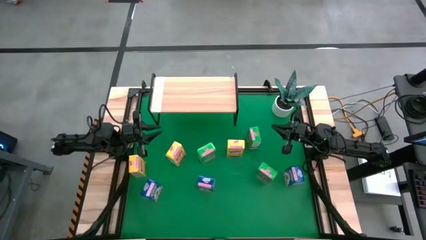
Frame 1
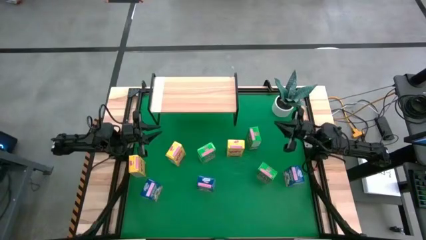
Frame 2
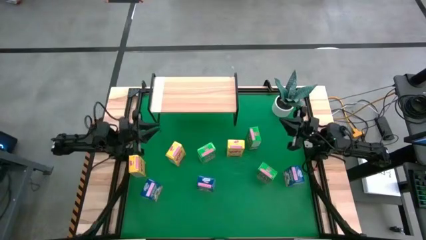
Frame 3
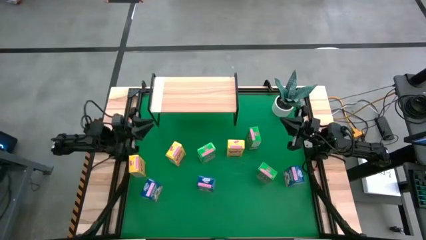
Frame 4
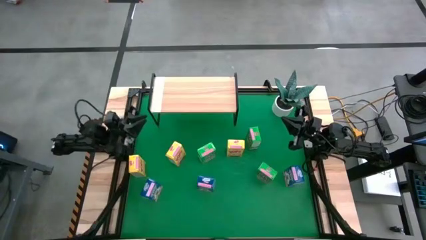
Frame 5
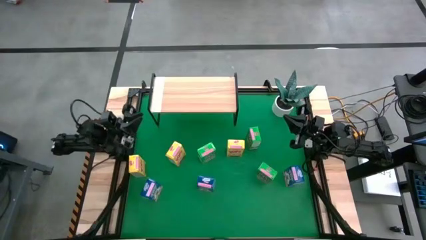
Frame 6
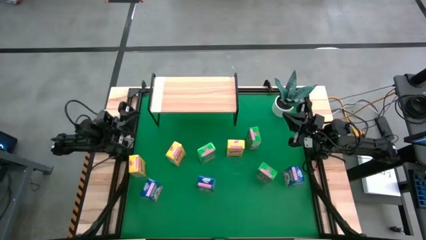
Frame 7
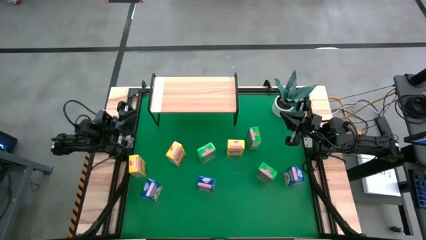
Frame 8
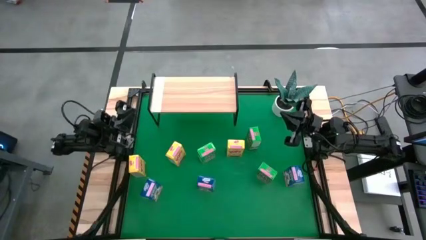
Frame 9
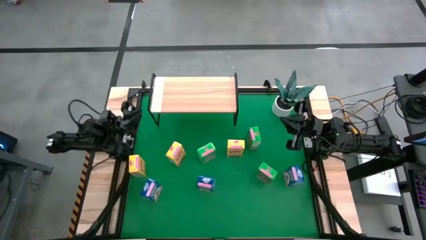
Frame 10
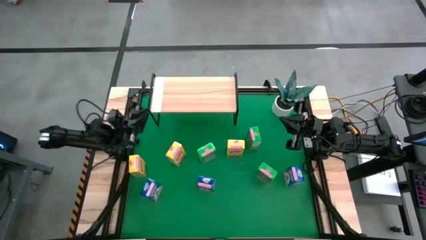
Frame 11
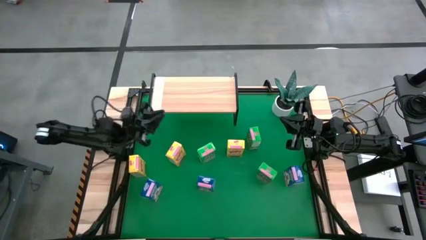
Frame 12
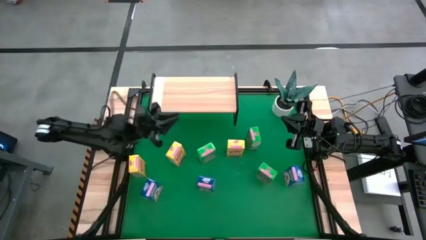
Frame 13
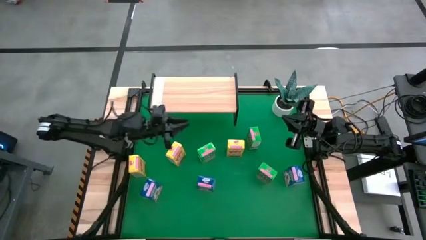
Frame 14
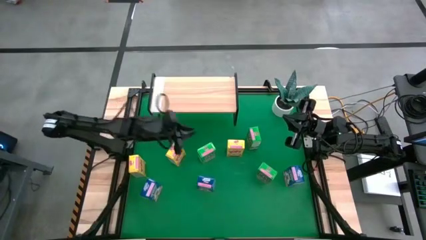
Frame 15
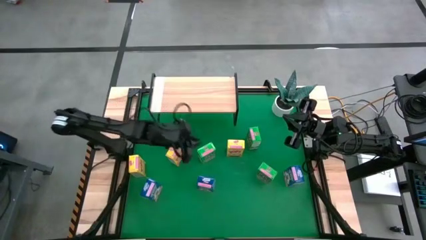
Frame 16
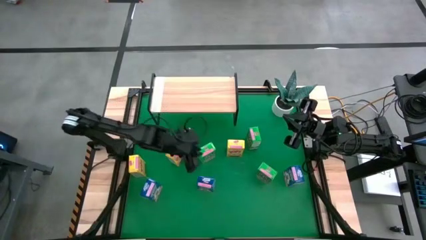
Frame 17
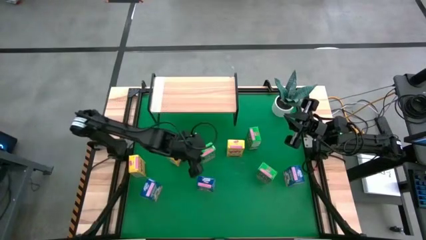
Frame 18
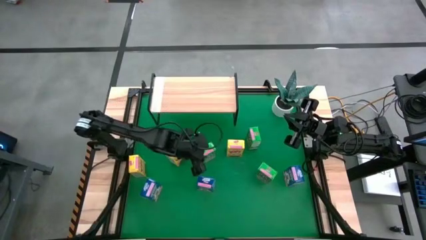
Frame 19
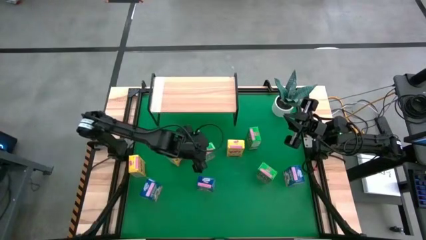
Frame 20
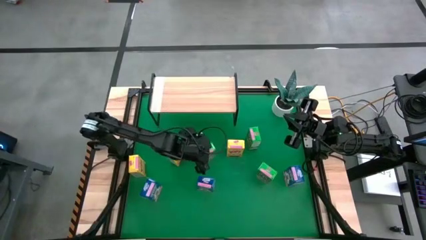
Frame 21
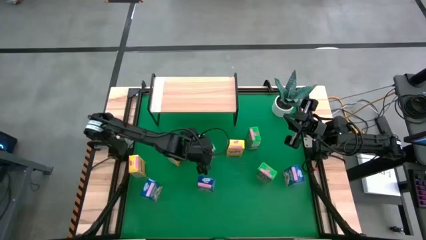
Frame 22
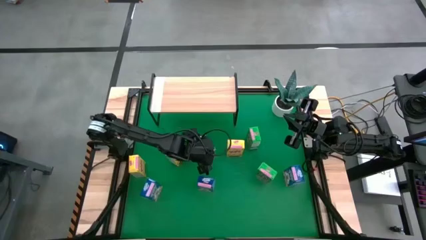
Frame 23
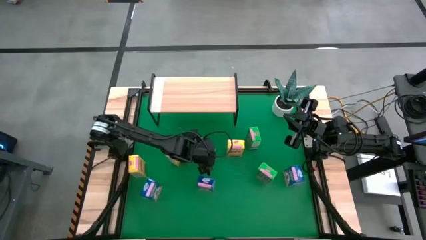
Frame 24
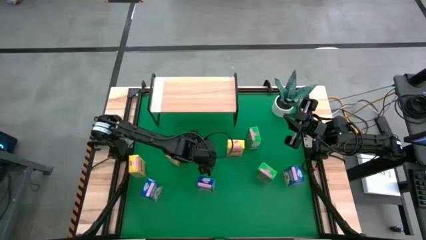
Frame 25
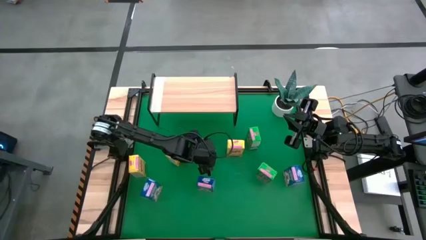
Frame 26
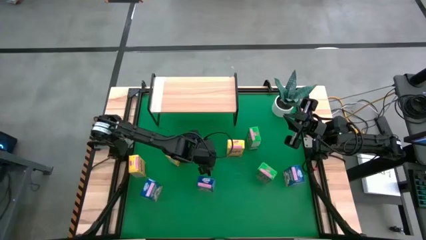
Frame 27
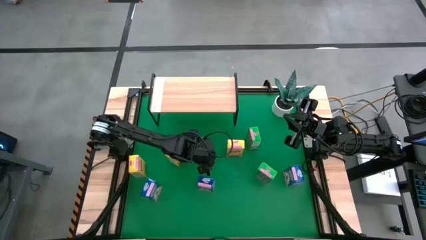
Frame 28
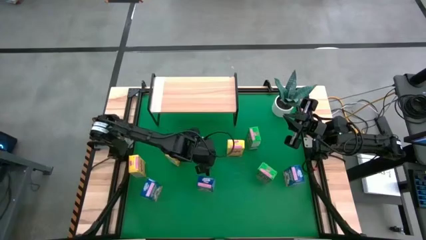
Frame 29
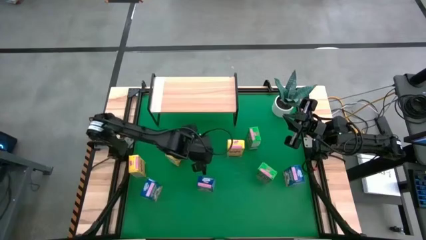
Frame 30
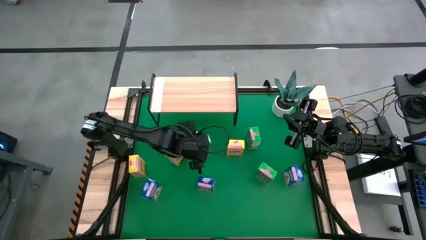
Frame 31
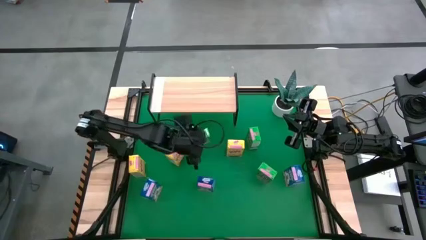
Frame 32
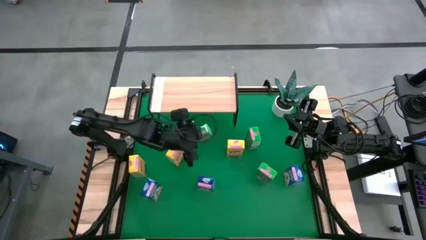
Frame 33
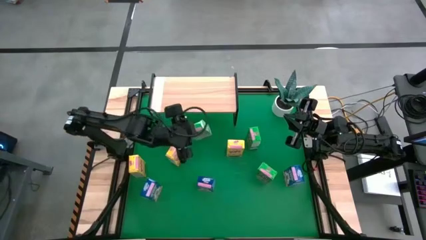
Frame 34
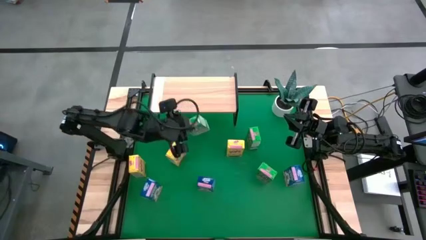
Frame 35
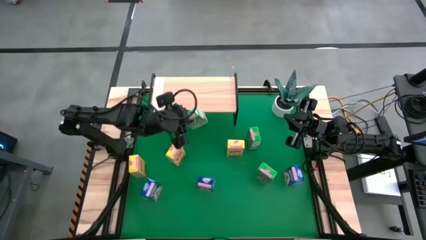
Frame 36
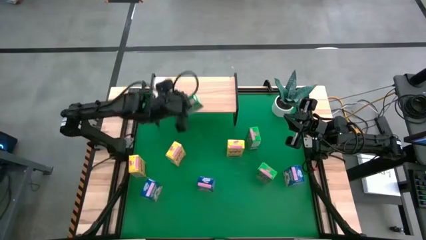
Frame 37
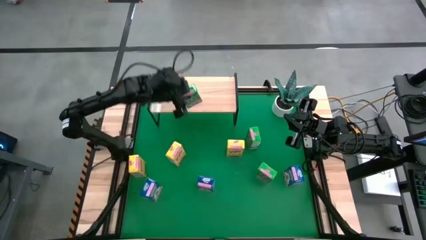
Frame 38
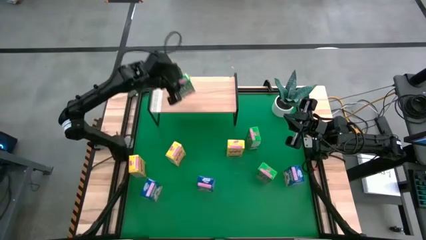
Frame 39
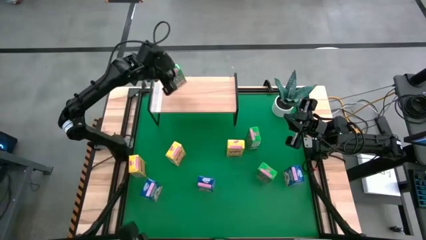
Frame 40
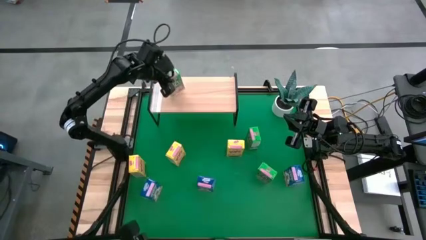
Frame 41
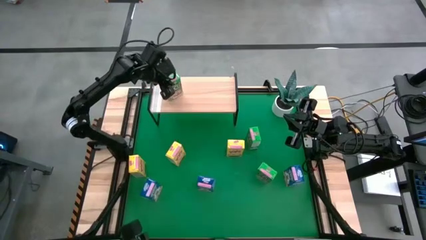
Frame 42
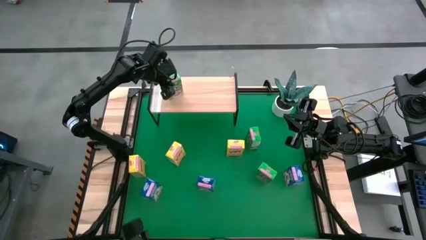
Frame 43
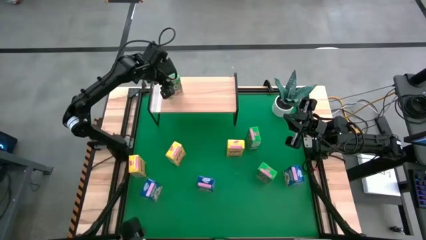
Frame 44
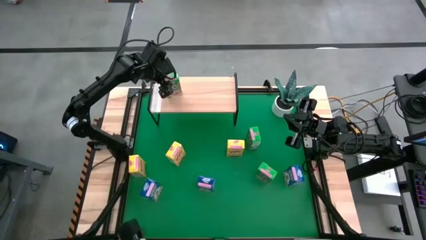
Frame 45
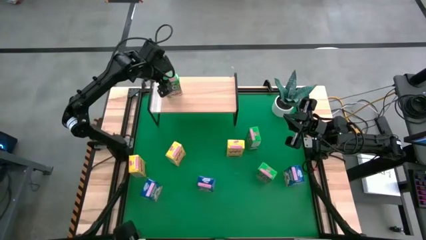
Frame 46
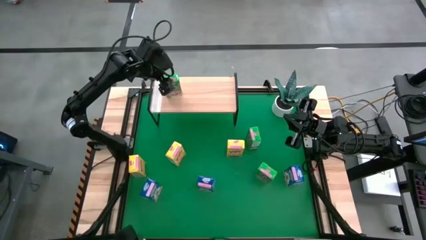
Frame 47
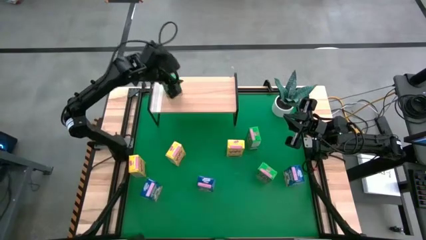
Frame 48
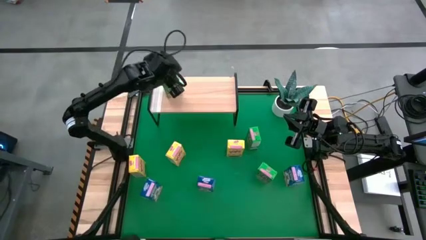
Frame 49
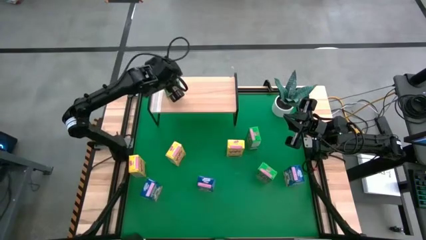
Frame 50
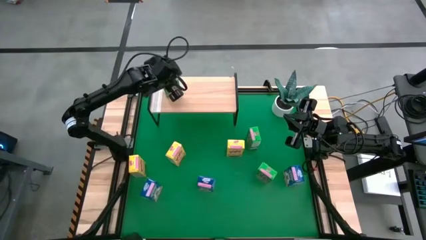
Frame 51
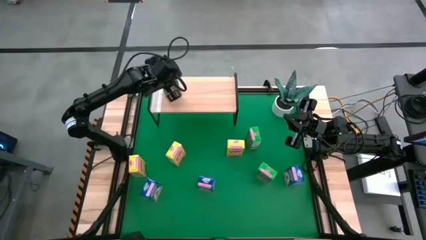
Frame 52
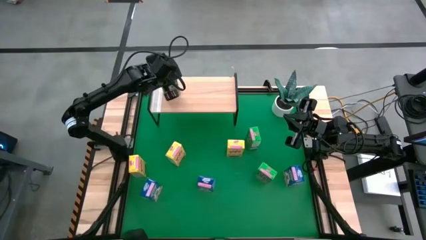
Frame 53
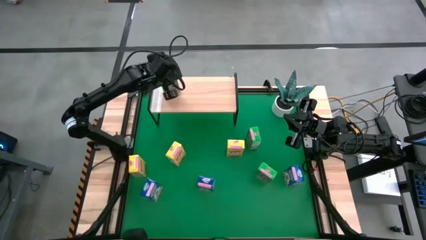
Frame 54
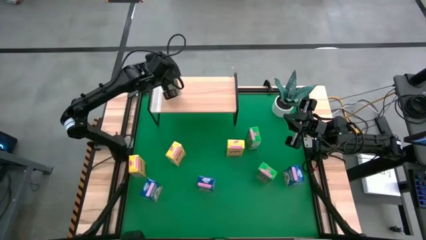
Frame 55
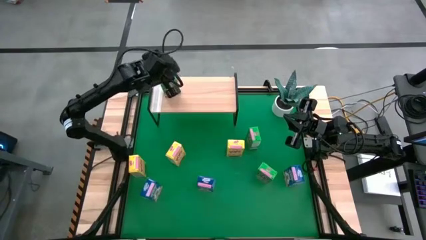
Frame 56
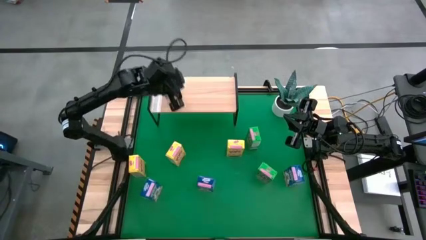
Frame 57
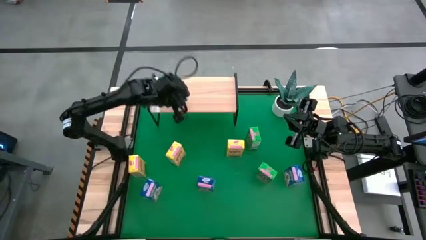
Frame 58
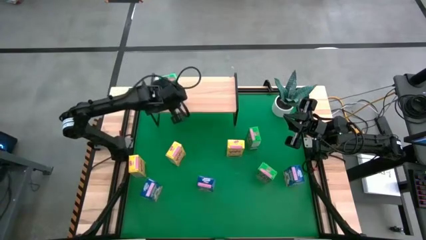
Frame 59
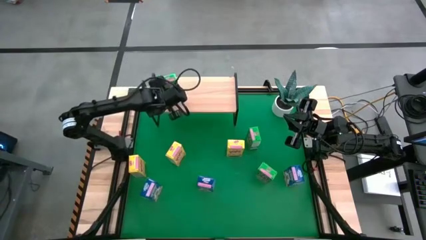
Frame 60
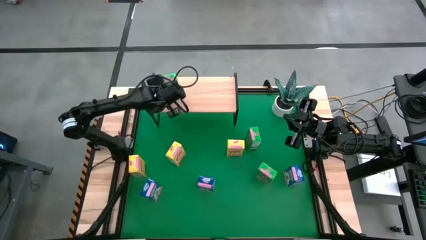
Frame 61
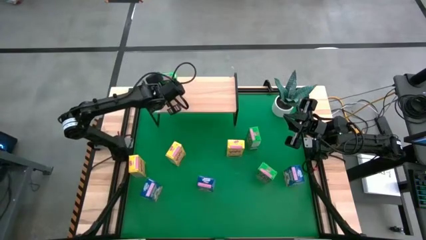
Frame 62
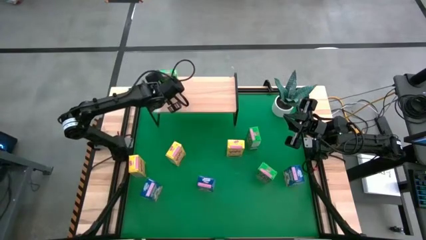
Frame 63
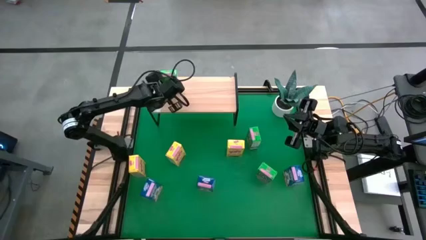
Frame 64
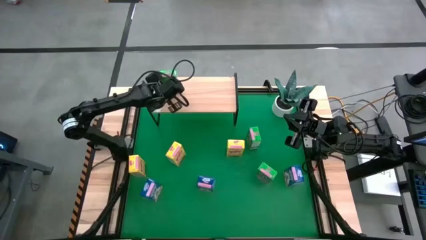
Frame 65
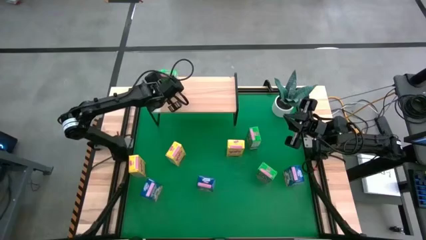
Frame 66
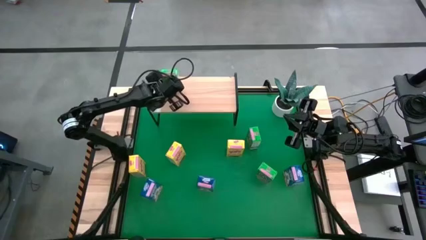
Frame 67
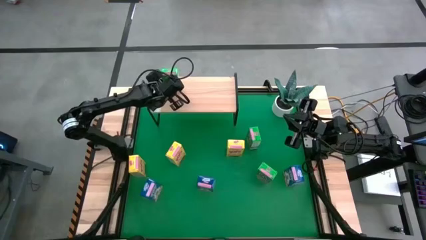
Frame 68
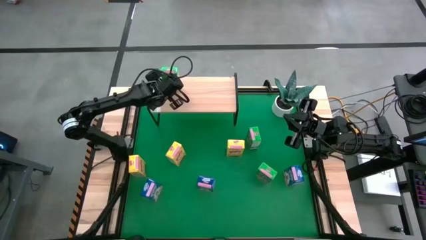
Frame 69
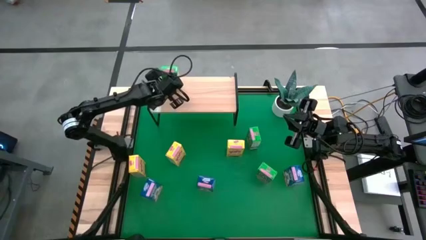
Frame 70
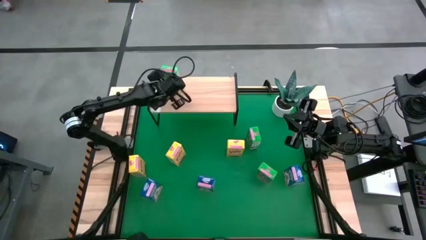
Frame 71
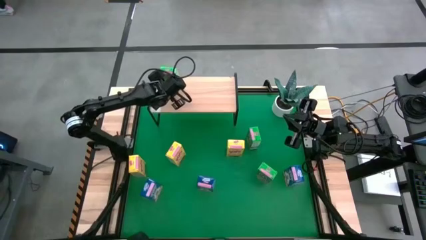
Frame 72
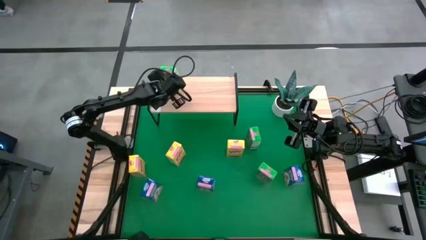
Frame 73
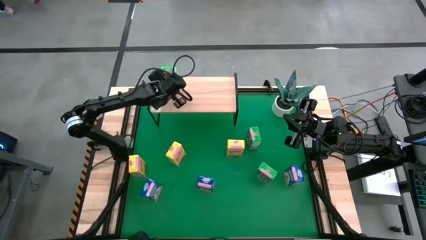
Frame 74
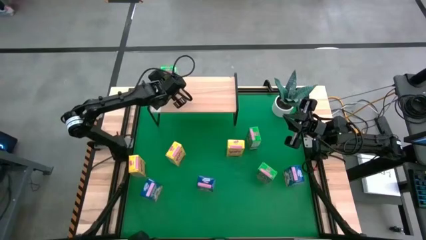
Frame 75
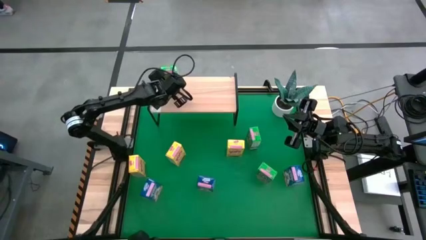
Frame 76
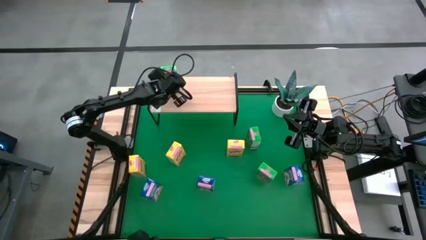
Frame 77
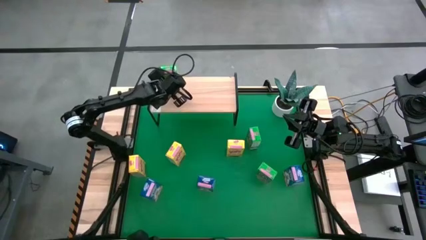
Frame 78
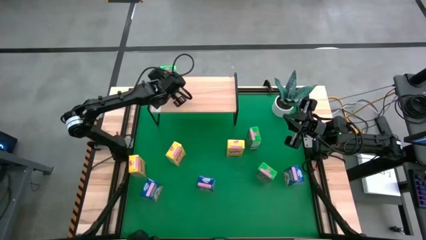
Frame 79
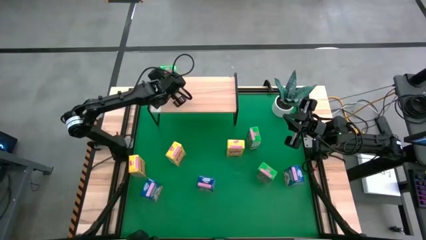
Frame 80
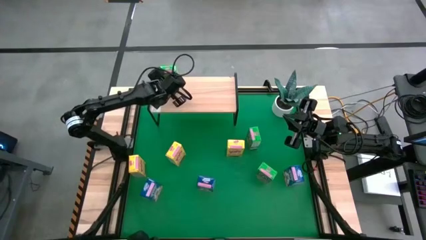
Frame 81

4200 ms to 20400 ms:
Task: Stack cereal on shelf
Put the left green cereal box on the shelf
